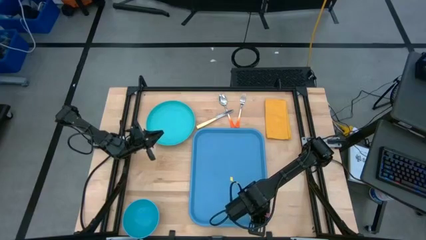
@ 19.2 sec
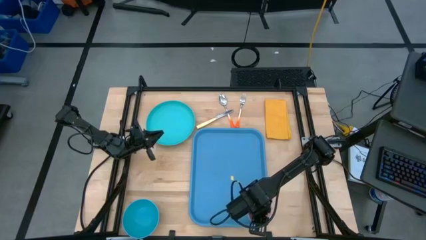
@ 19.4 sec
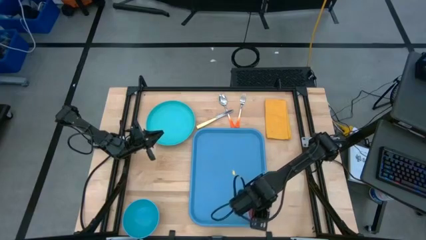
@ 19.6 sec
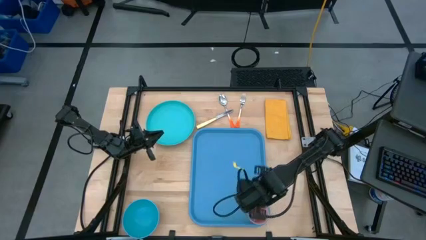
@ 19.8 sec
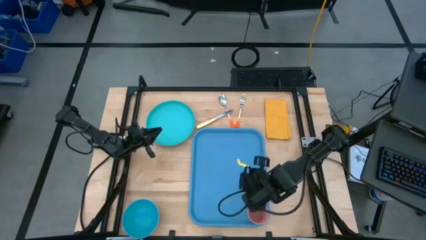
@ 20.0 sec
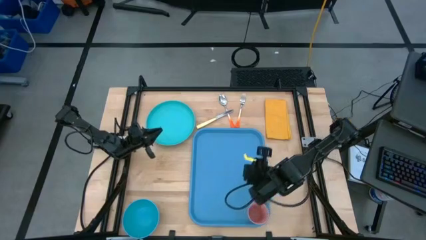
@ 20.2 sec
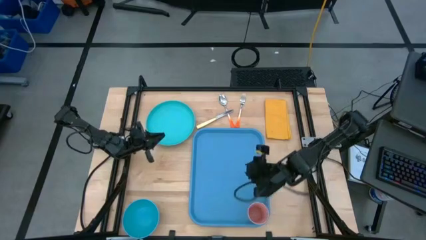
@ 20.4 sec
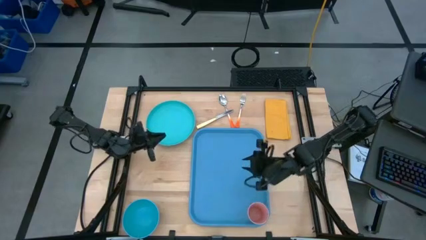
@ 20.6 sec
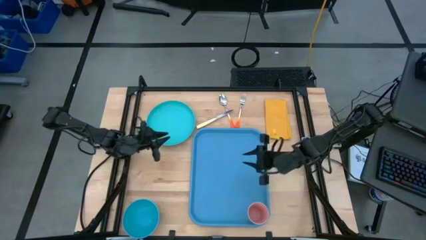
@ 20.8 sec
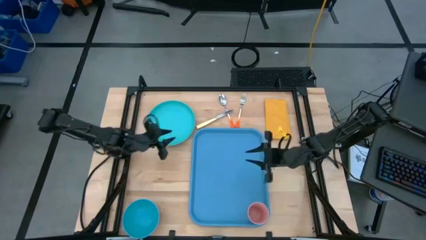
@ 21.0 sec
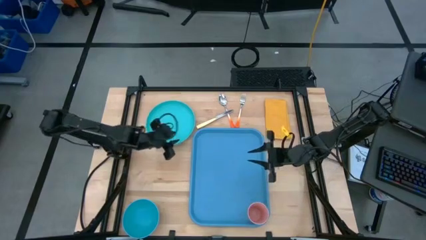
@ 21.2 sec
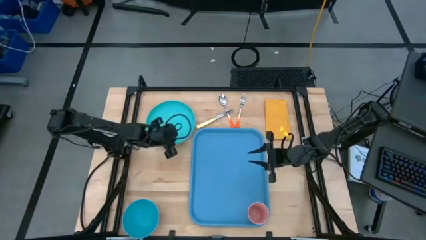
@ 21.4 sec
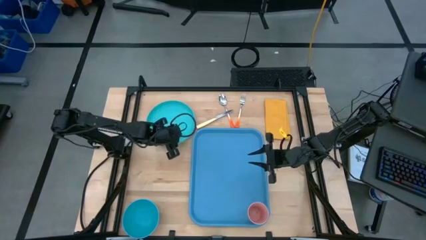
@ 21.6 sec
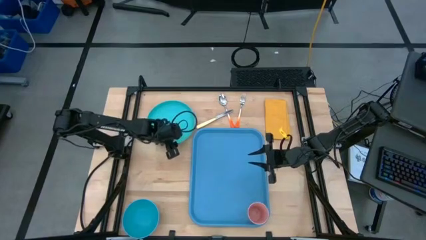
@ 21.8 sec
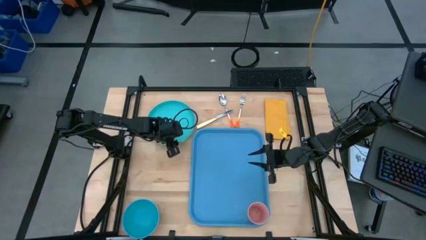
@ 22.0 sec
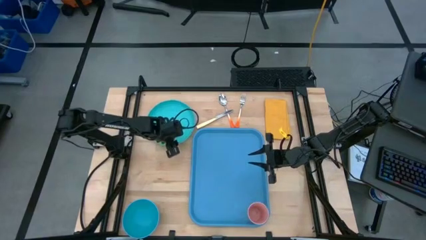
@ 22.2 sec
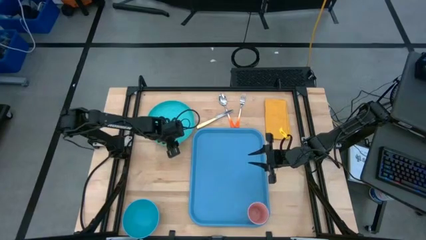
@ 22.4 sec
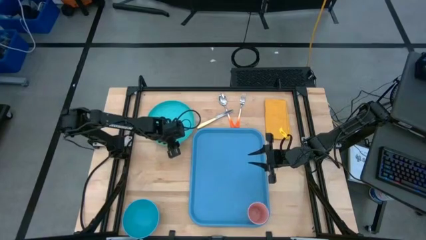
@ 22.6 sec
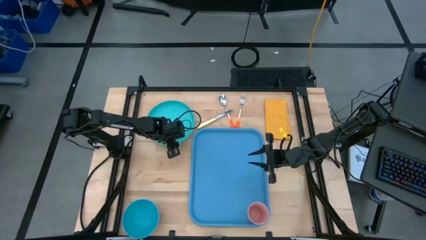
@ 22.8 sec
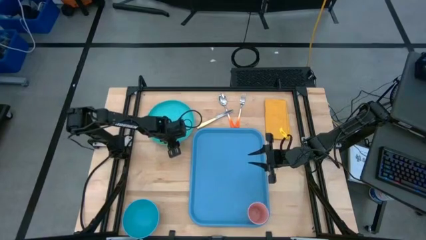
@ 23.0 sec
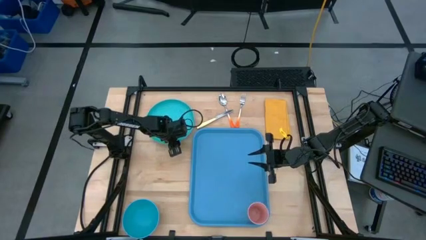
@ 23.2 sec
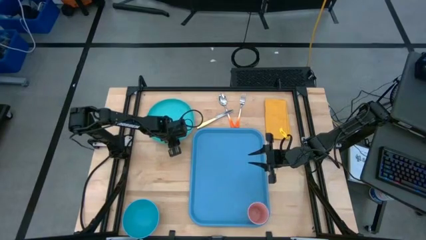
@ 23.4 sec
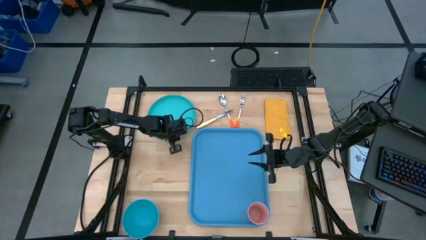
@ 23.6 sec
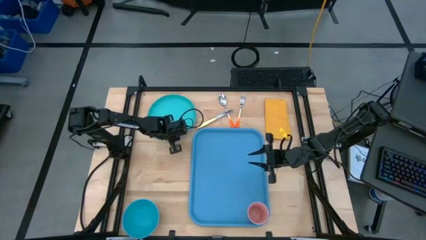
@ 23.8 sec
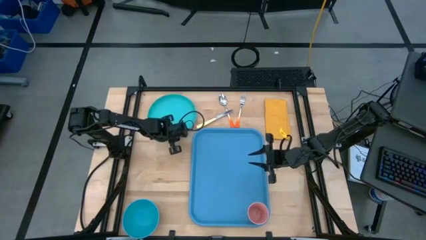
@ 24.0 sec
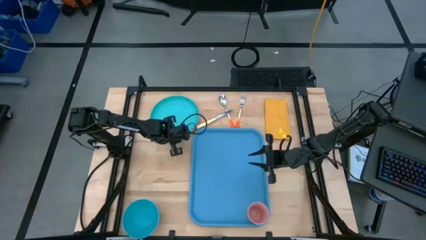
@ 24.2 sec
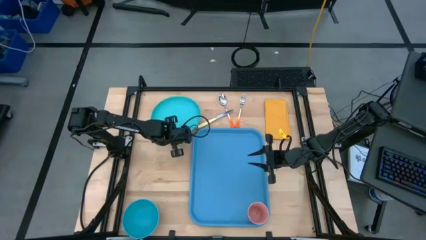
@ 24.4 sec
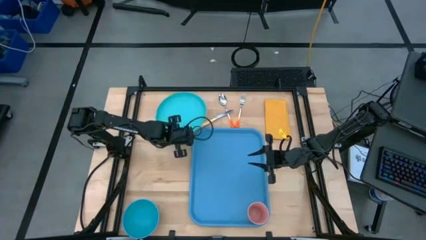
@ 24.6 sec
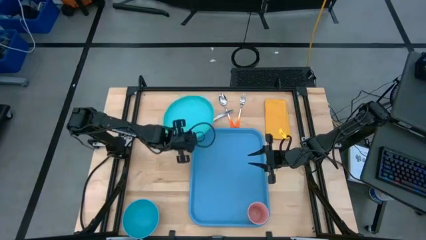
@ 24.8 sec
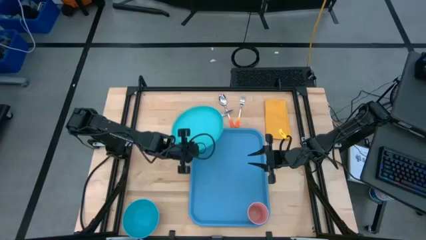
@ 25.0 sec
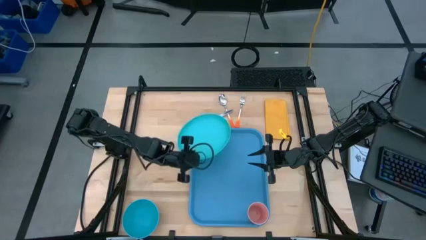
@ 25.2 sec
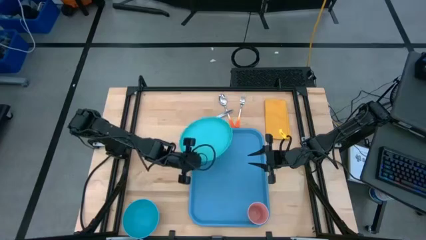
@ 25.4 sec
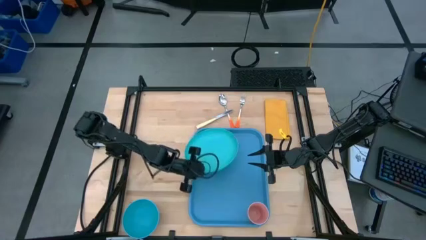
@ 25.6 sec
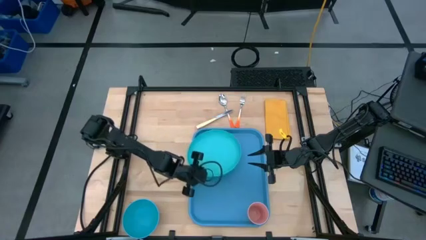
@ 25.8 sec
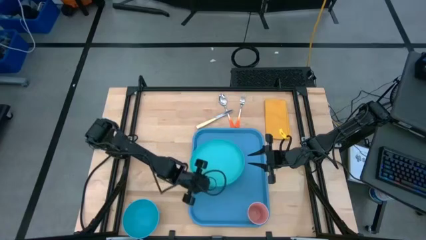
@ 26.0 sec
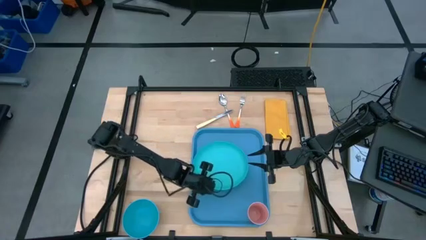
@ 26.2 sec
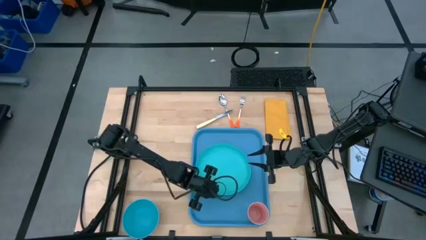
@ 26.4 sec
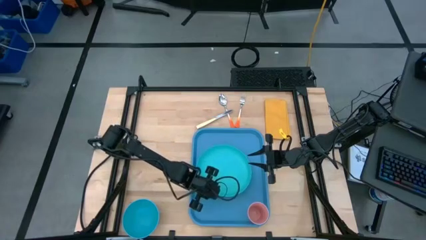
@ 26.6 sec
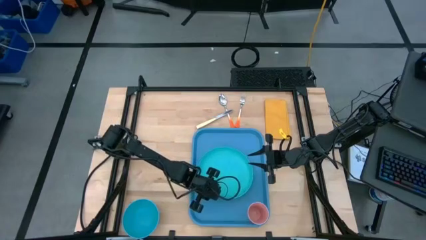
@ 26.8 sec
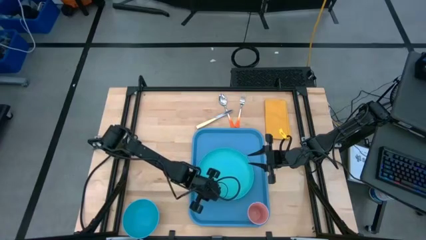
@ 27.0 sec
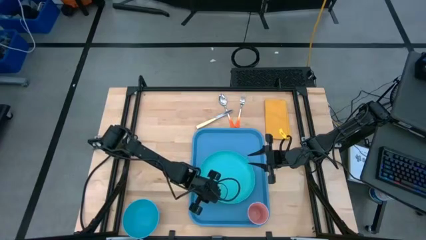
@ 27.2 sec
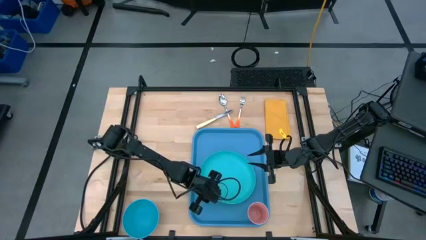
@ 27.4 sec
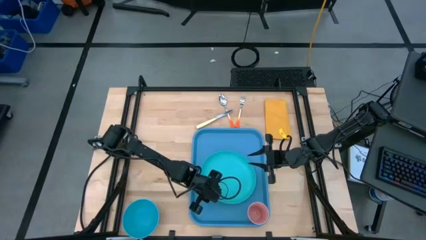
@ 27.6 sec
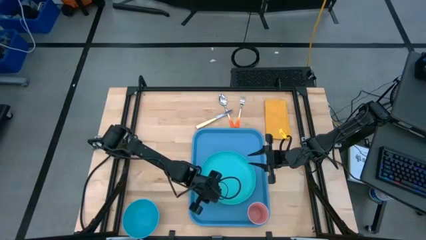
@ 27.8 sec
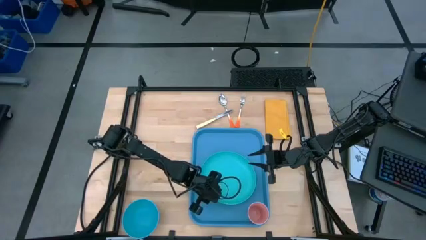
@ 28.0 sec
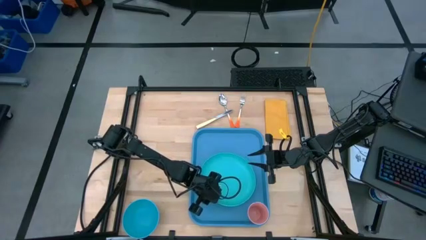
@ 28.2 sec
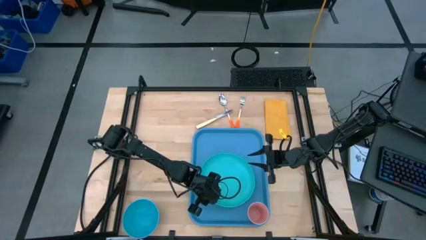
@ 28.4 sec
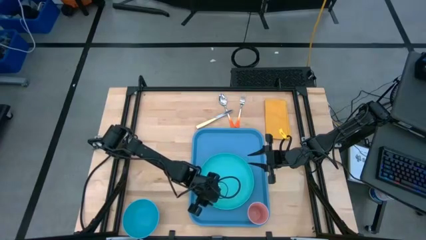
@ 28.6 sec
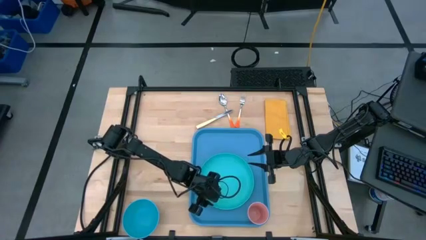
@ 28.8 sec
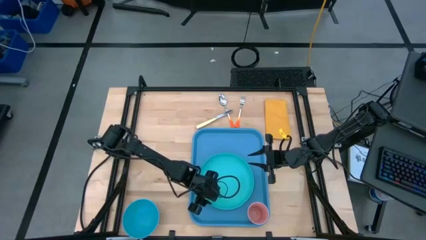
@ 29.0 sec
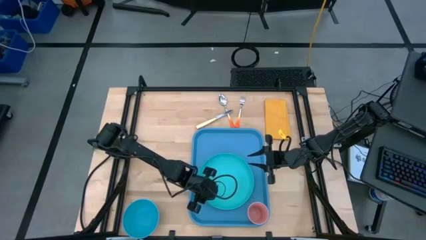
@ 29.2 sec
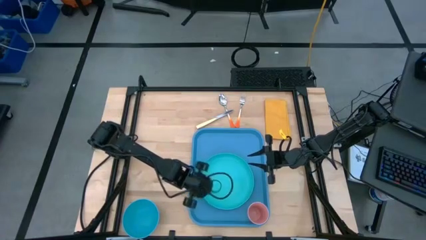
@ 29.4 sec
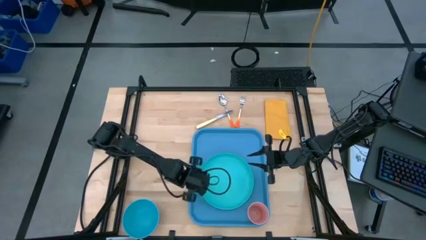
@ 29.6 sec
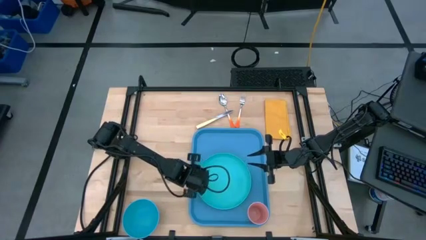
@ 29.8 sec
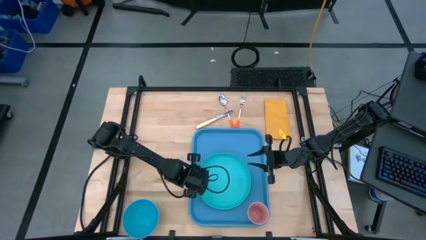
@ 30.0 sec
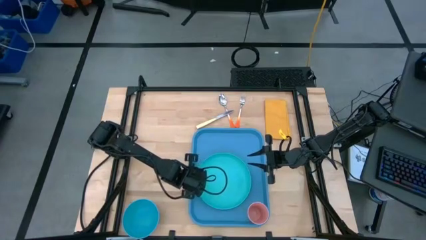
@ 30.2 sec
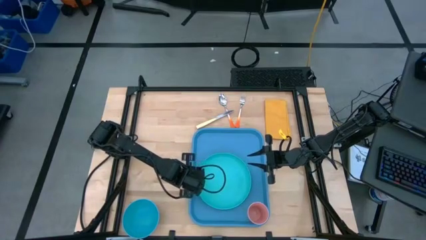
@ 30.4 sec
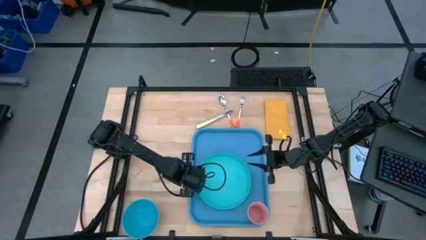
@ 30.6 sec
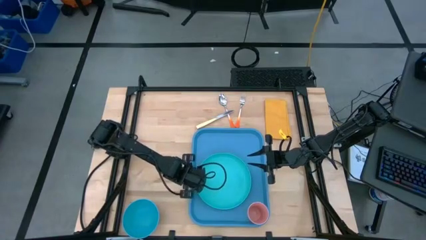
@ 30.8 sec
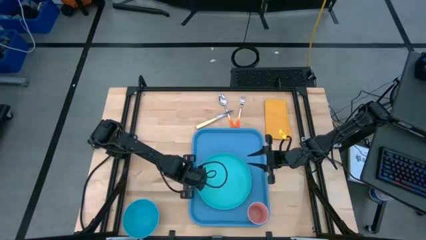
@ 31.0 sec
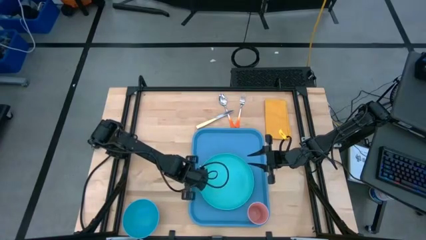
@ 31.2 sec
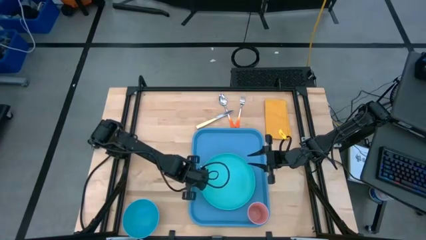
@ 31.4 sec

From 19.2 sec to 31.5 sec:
Task: Set up tray
Put the light blue plate to the bottom of the pink cup on the blue serving tray
